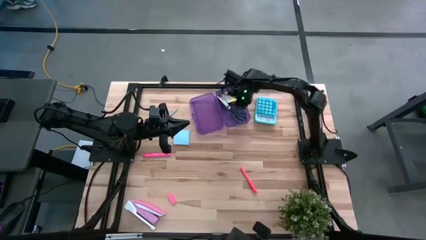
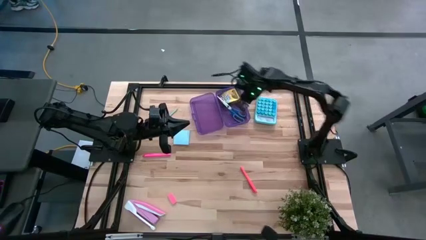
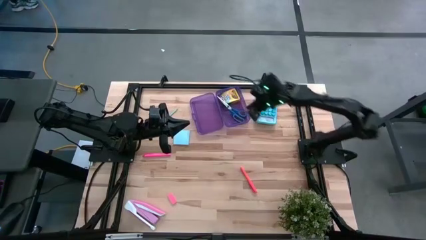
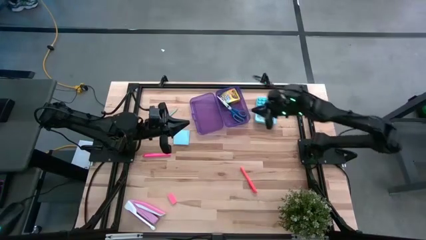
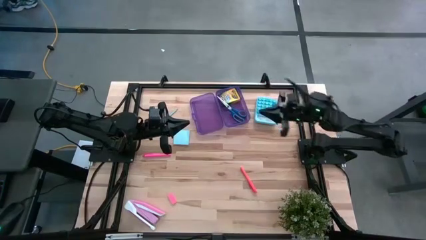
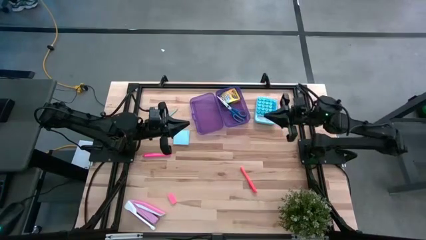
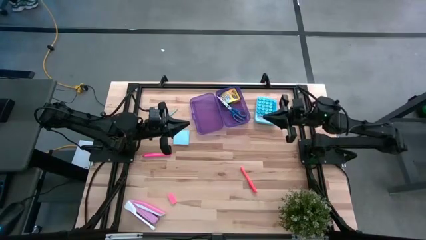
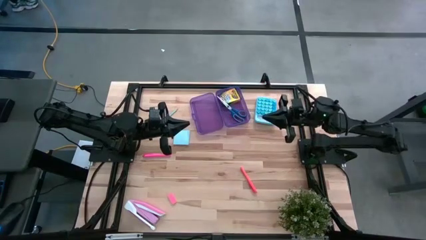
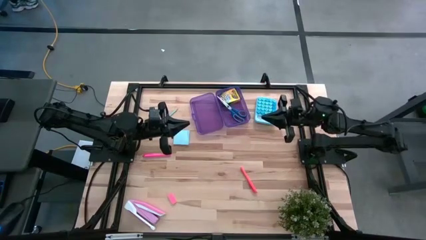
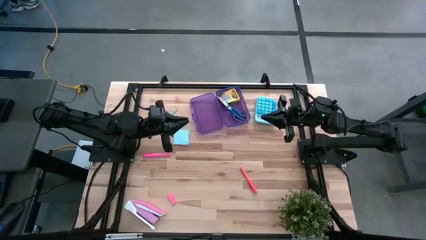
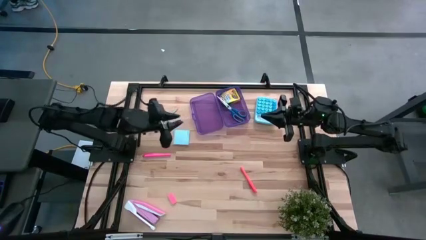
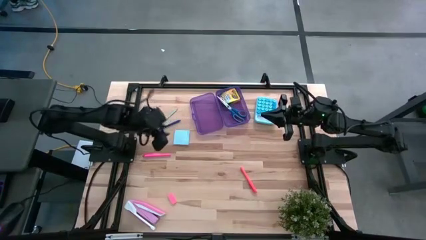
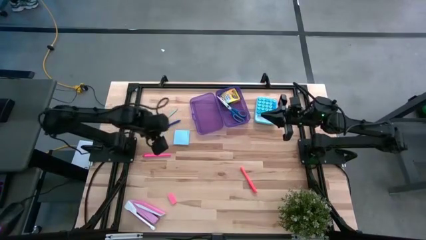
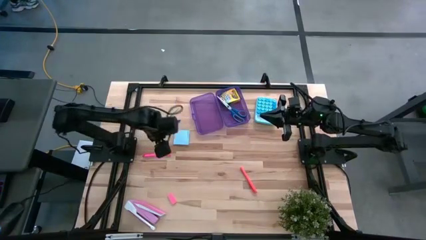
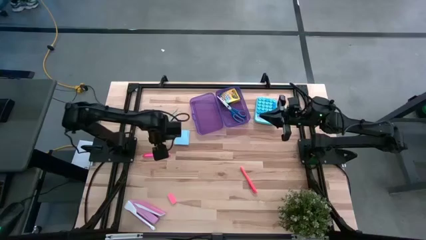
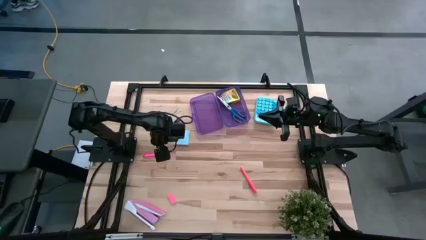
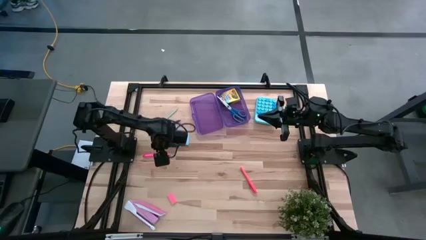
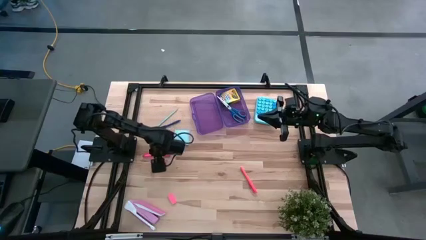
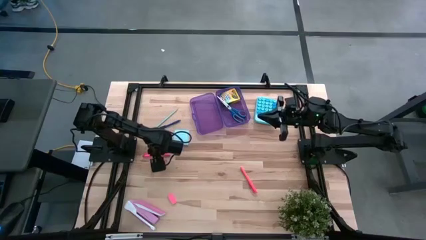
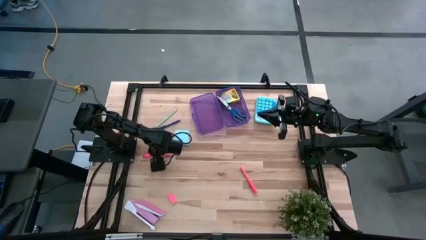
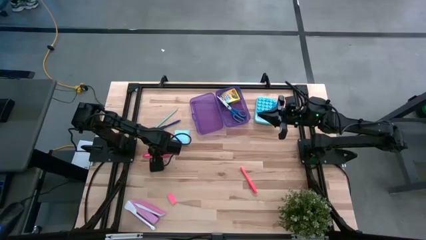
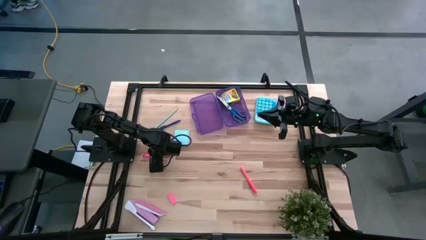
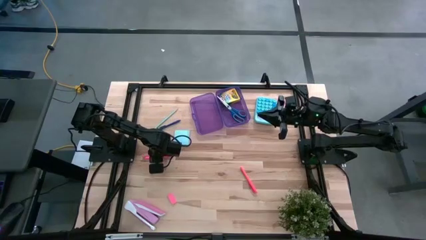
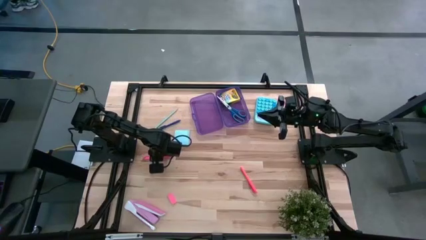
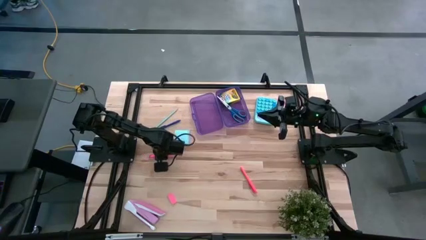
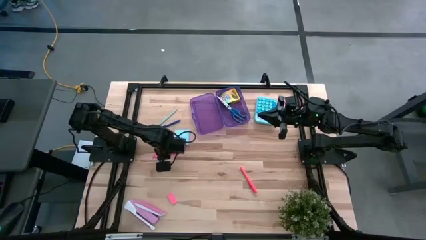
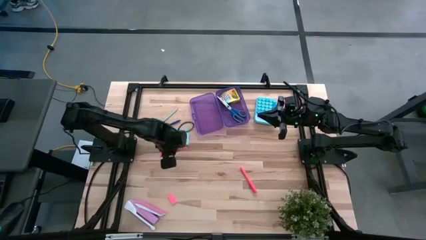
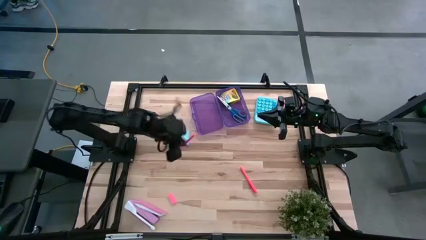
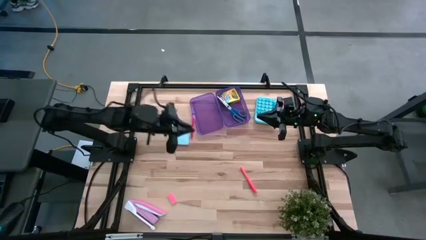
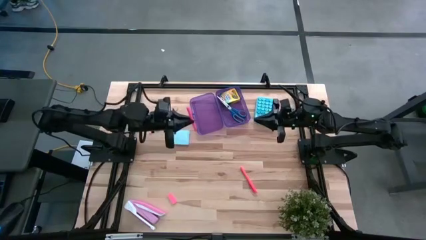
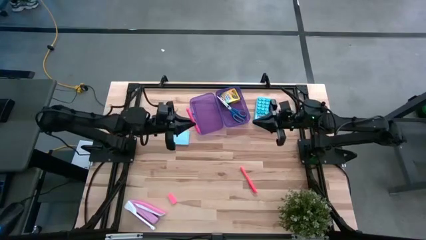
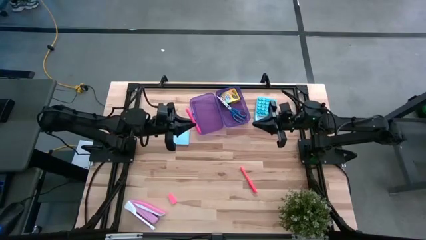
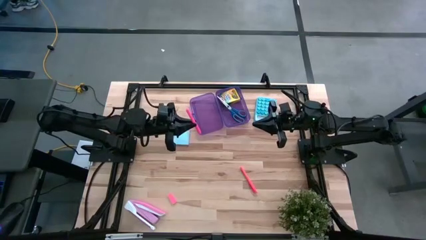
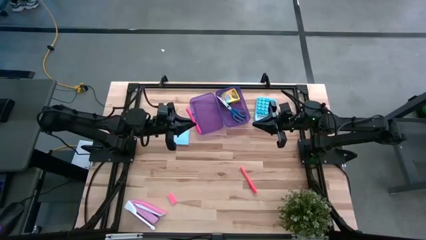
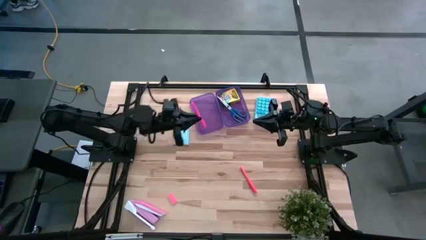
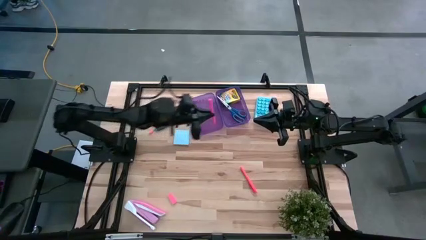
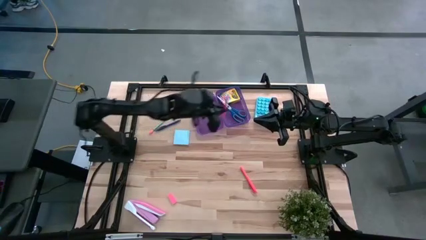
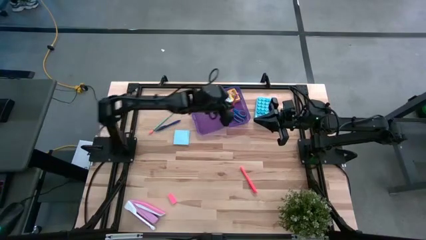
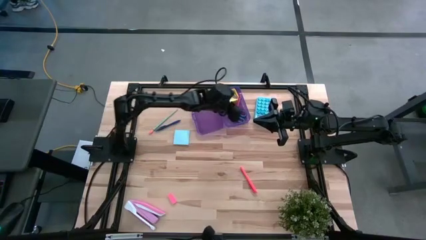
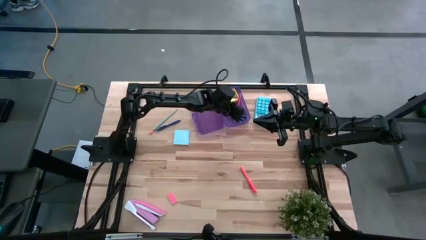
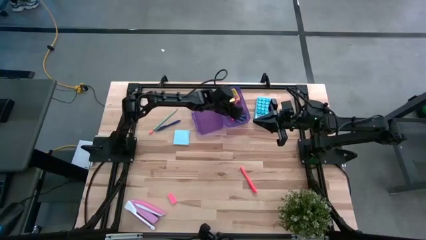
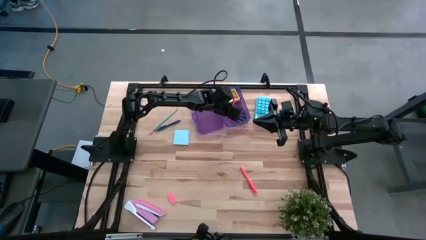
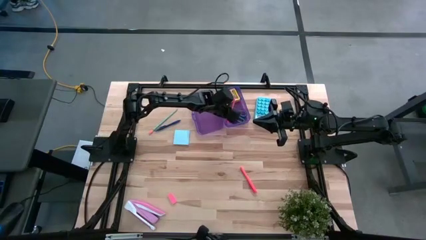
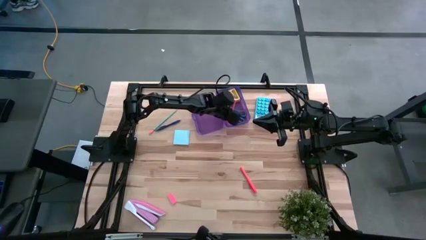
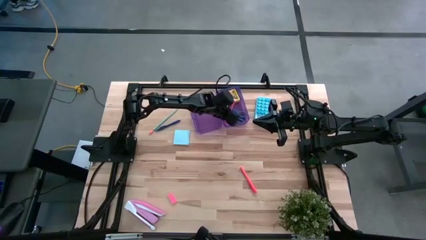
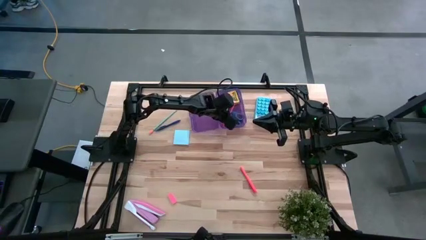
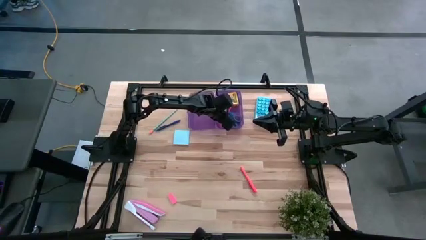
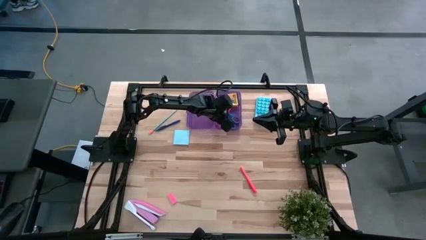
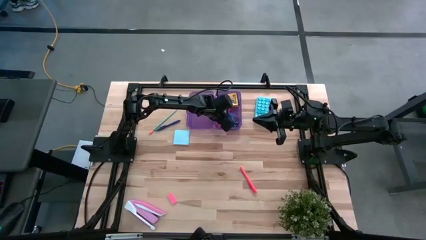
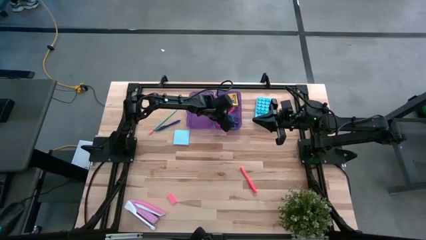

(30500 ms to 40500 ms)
Task: Pack school essentials
Put the pink pen into the purple supply box
